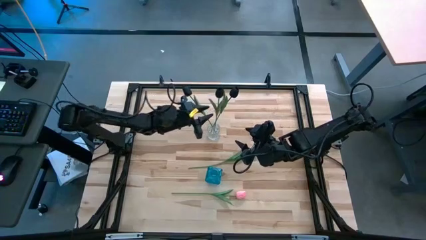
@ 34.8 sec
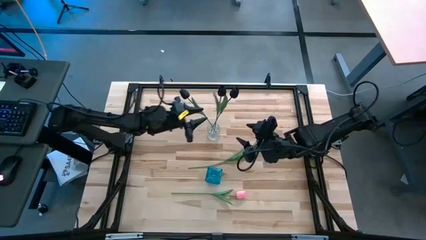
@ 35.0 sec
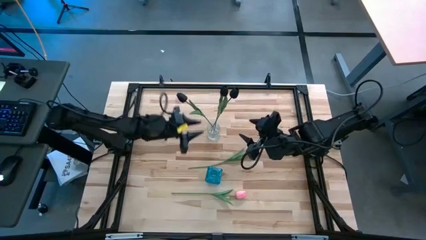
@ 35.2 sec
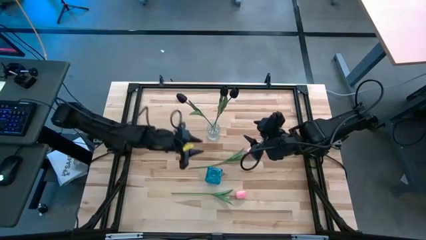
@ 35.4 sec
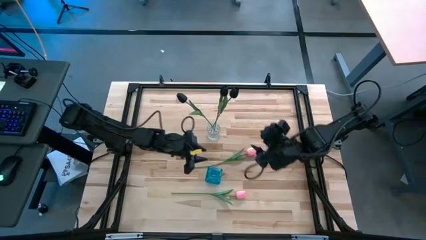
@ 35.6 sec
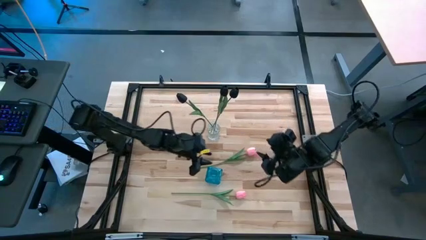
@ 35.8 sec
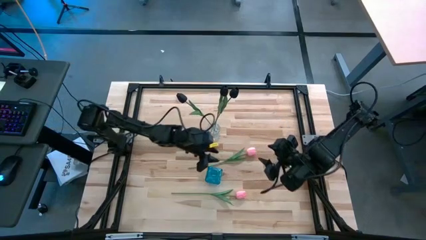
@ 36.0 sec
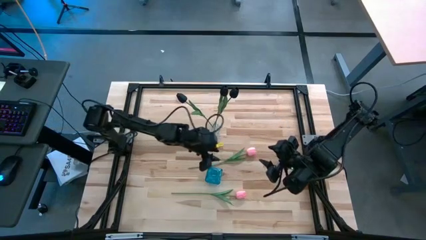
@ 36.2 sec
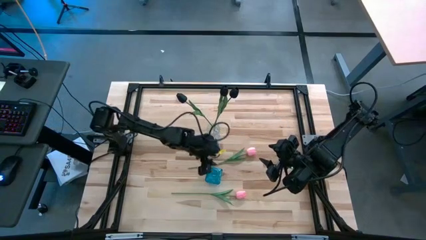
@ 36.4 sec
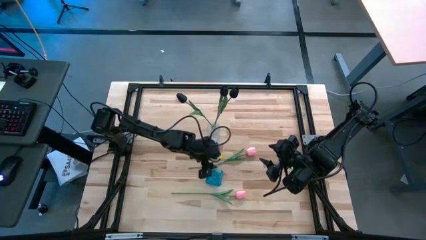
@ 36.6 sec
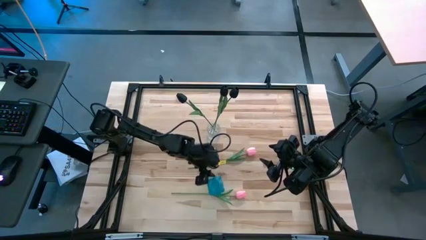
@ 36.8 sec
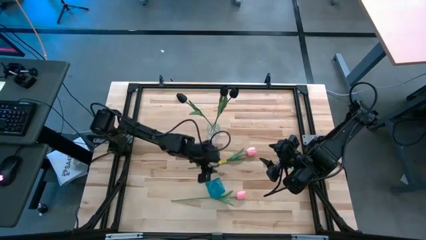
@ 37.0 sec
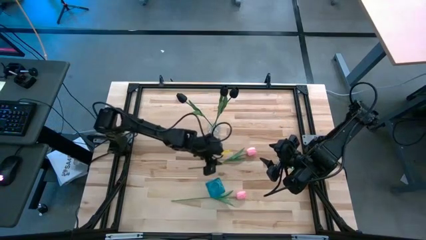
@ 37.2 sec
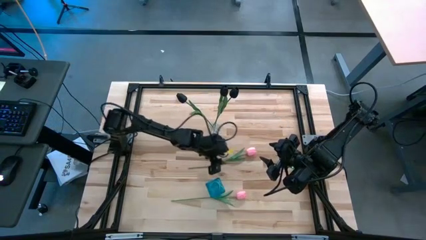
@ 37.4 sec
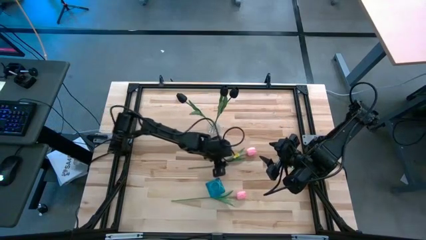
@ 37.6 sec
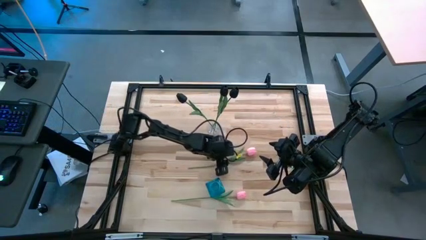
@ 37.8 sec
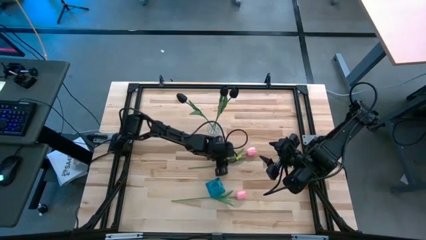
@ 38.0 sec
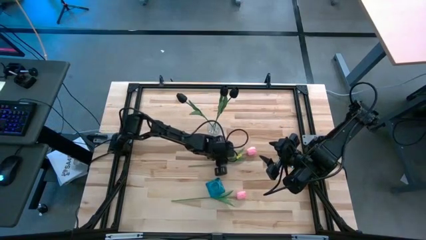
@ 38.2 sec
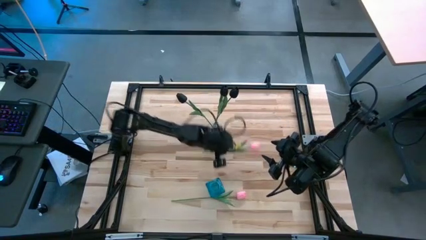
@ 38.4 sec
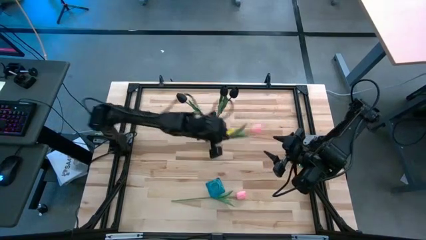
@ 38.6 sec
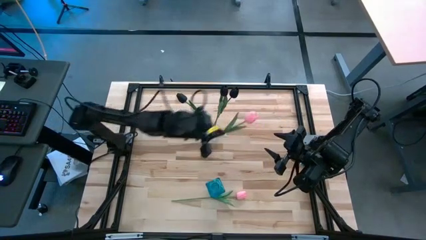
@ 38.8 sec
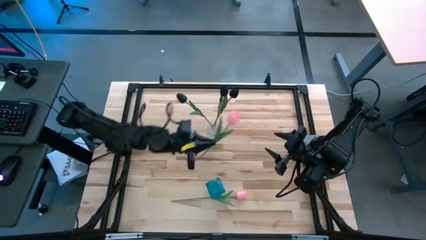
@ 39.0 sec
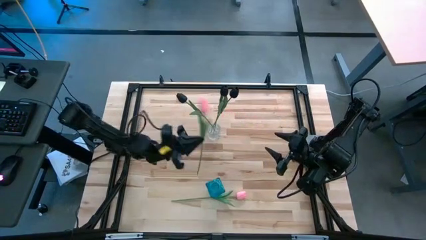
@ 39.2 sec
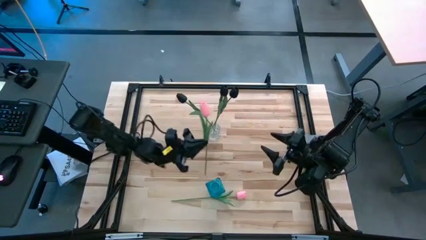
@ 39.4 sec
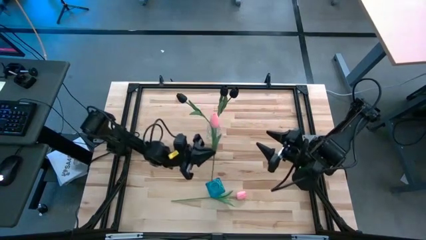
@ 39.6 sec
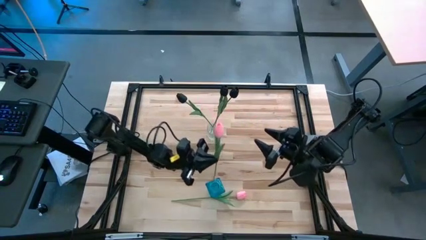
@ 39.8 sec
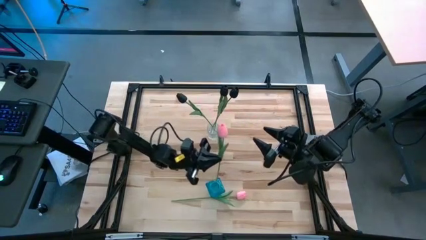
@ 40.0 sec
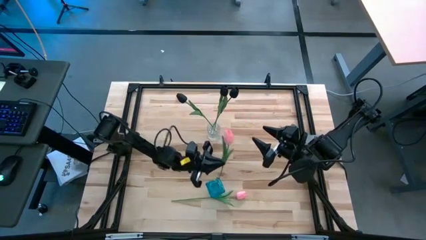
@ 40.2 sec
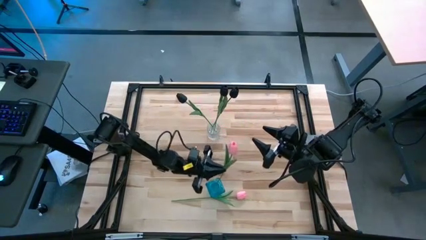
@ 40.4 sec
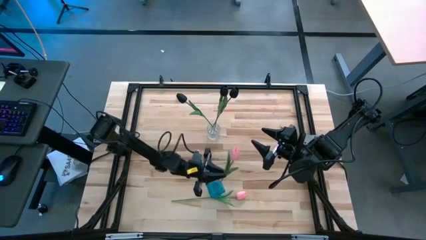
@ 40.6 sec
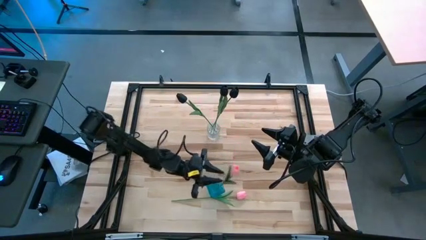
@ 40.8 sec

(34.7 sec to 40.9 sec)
Task: Sort flowers into vase by color
Put the top pink flower into the blue vase

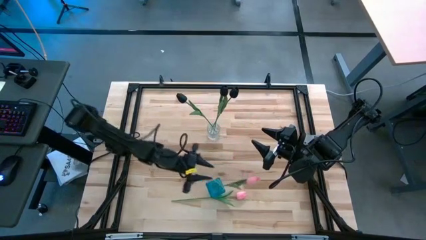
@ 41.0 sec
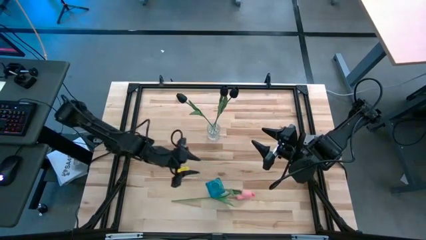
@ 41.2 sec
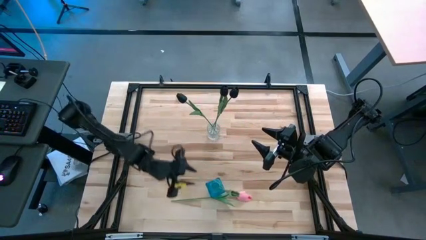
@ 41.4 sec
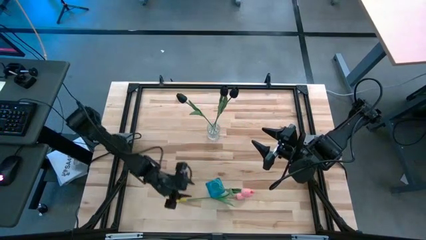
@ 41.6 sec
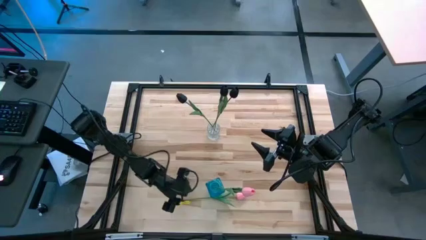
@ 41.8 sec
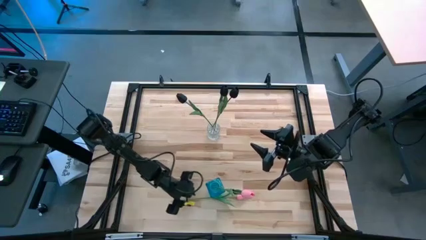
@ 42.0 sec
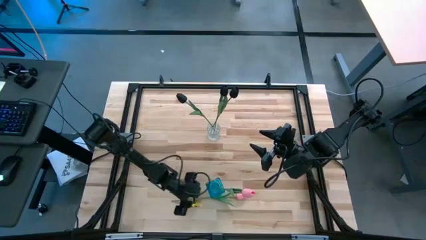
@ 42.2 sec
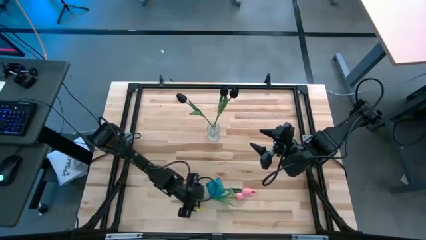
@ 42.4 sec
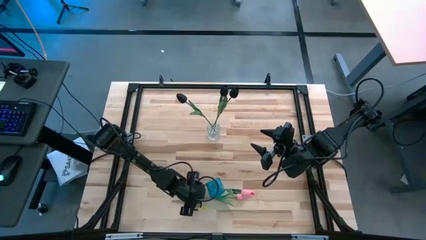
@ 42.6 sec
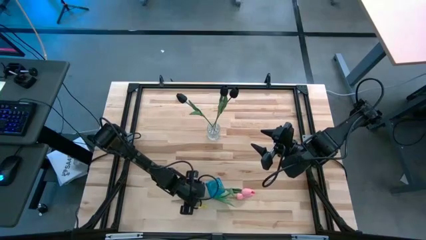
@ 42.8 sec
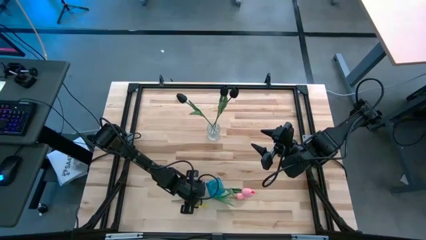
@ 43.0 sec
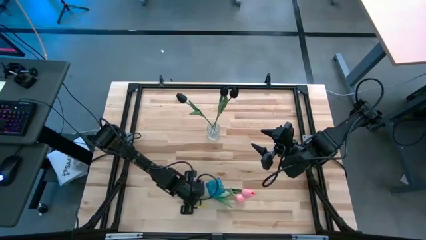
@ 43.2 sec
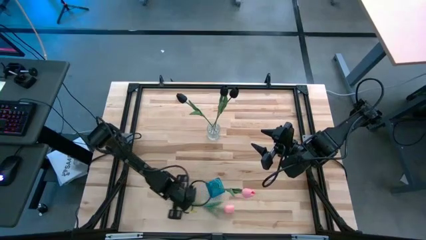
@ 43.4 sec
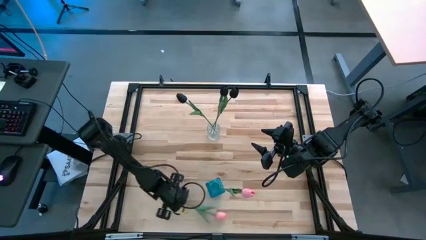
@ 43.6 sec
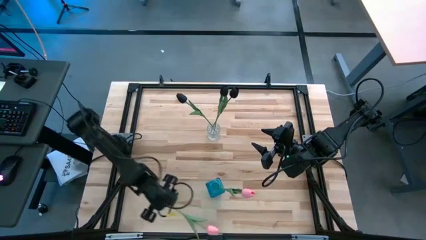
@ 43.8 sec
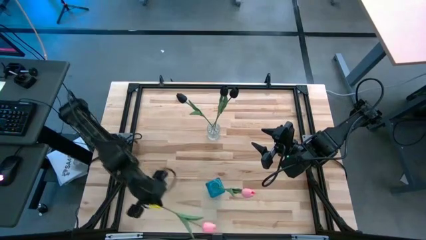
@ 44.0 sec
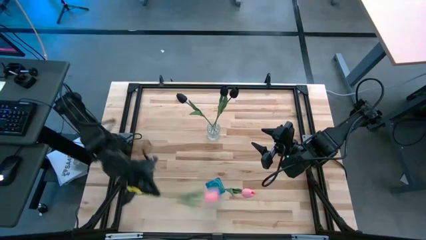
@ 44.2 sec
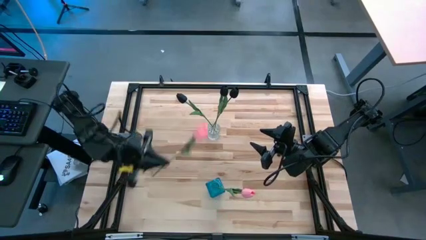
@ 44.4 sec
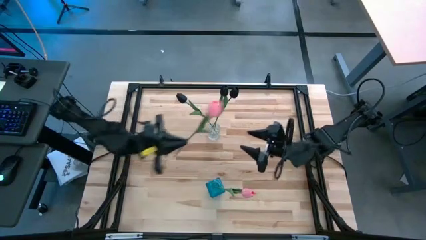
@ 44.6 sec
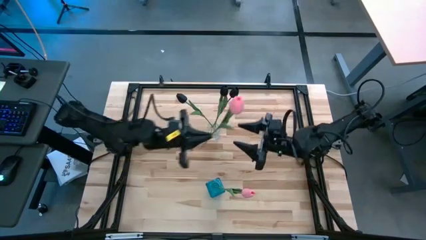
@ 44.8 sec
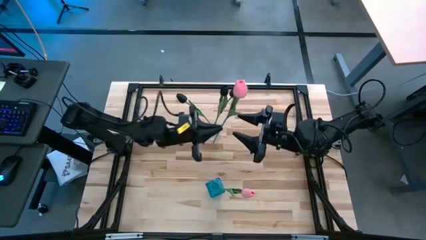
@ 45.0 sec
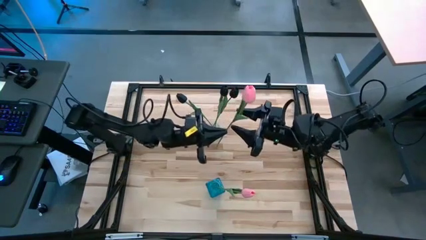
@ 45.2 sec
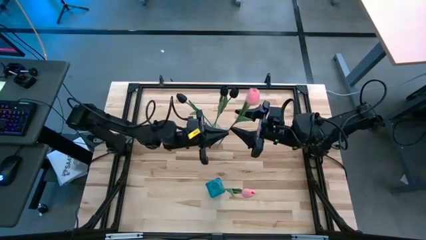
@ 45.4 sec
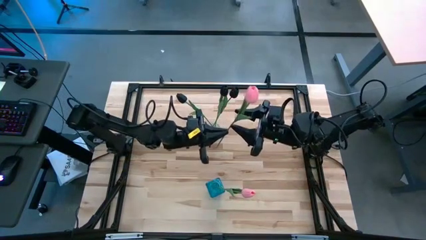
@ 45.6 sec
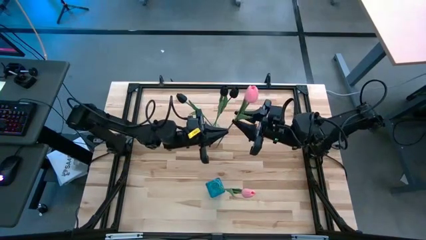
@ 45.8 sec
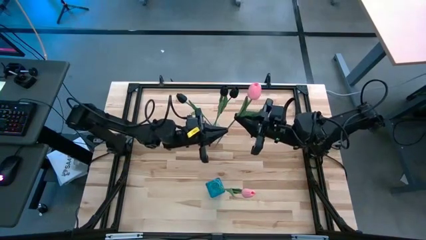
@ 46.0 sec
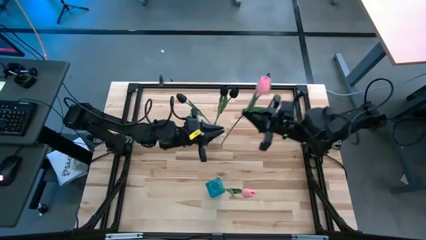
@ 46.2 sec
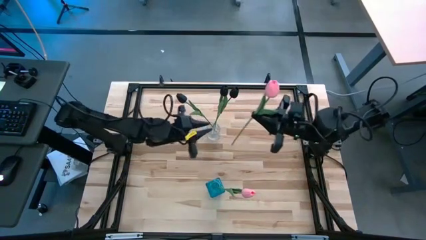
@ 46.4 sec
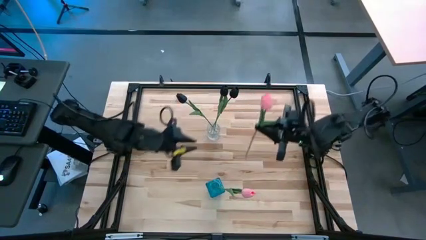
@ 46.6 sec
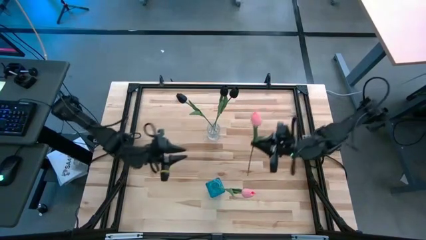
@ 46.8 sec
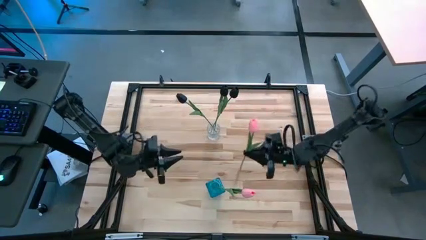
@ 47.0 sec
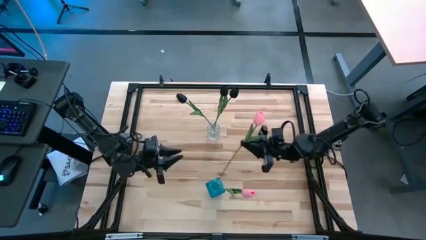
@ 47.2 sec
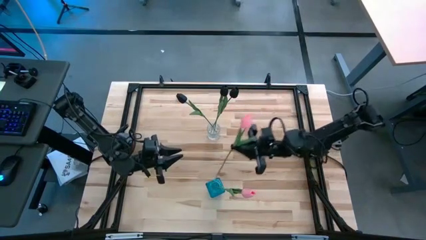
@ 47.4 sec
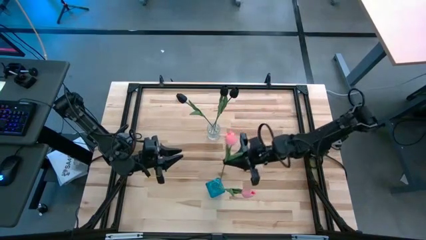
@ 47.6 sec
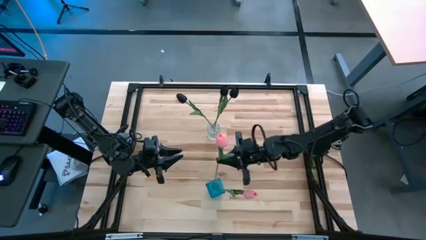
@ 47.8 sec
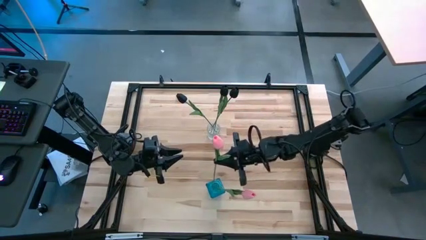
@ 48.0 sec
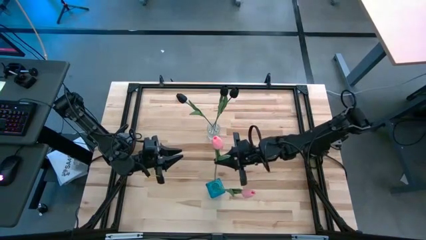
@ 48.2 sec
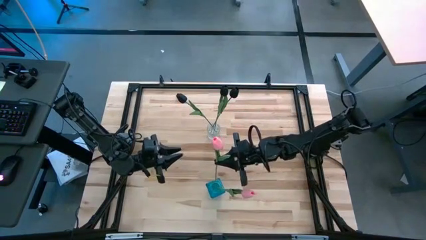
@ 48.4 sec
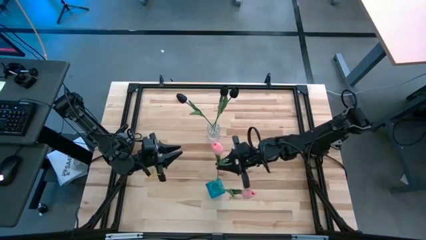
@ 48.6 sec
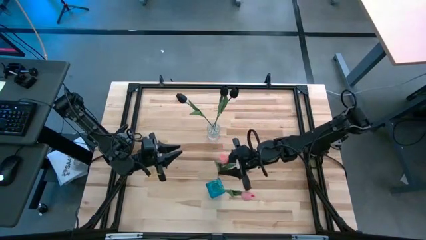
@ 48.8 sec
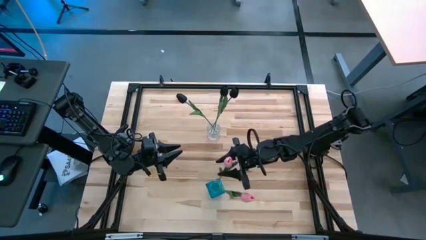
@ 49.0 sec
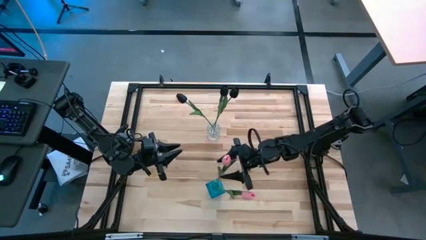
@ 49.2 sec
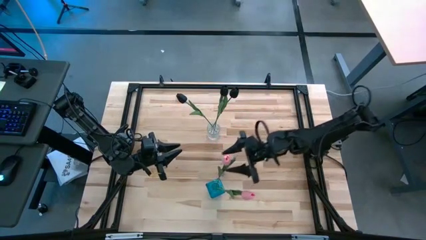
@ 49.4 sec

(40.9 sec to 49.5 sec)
Put the pink flower into the blue vase

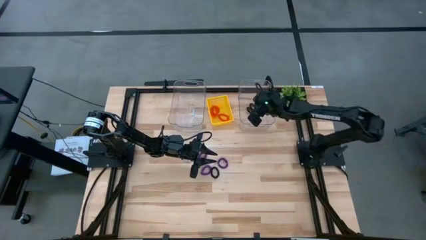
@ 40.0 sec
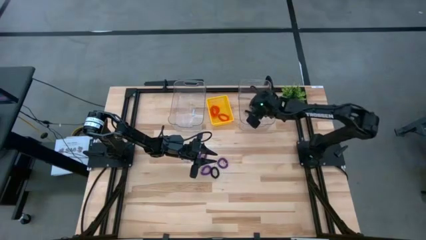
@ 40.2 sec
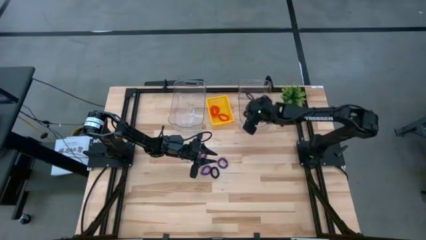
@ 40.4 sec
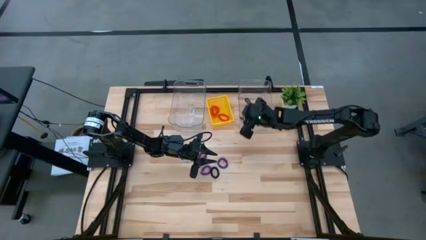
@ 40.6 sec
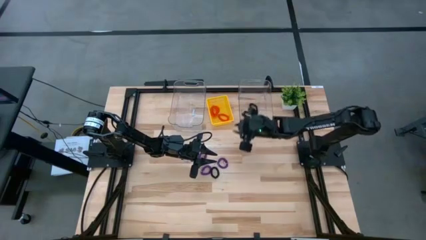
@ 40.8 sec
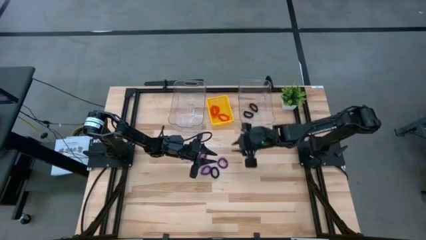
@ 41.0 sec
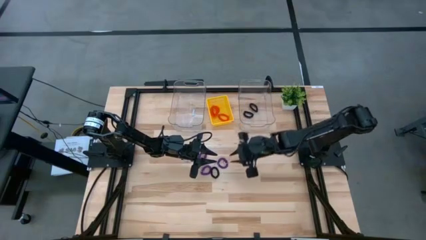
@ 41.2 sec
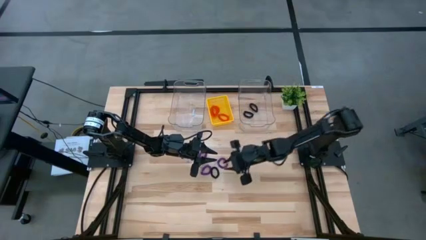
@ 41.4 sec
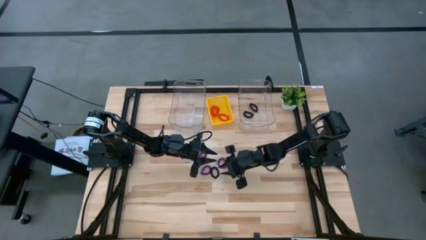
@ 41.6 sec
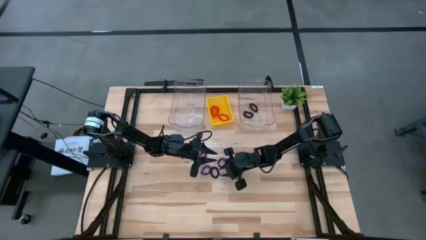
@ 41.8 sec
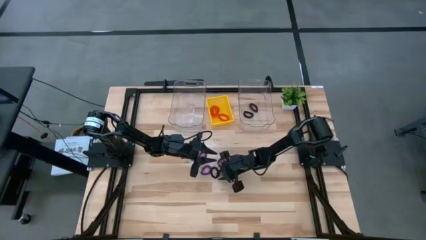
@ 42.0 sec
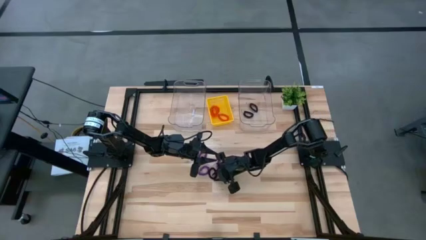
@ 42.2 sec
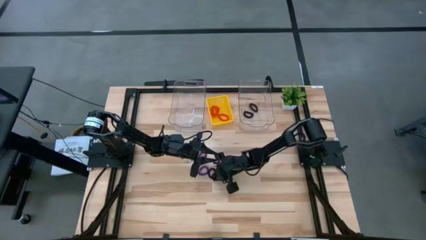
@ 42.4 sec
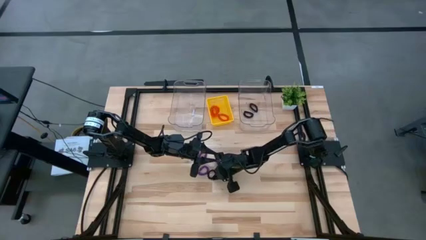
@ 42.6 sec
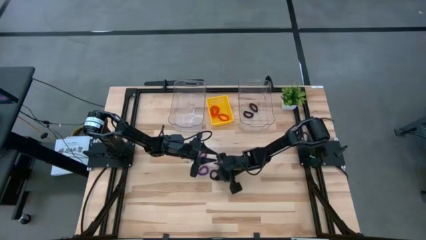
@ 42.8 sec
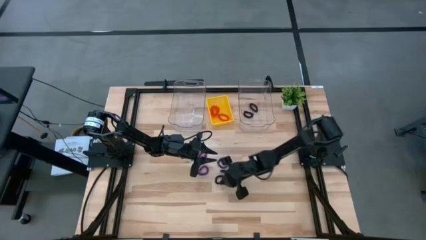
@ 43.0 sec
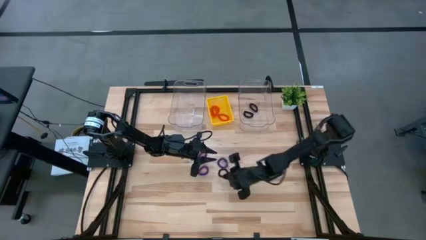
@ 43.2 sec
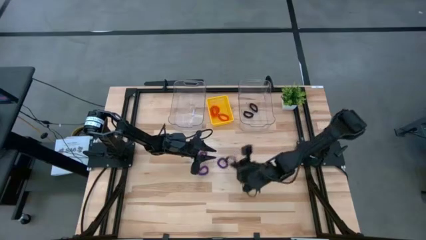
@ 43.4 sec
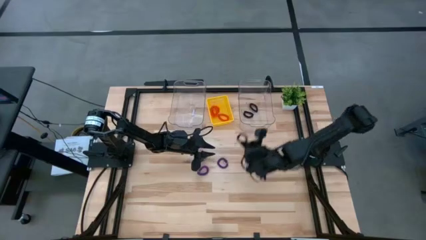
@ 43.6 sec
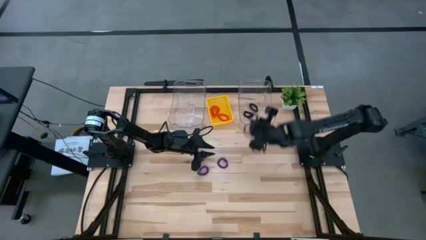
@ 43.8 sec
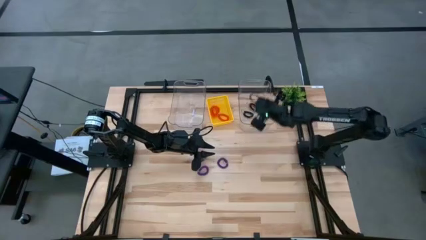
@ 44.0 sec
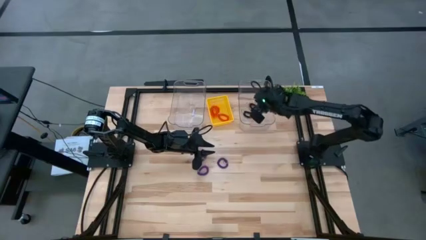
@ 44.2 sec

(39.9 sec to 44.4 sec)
Task: Sort spring keychains
Put the black spring keychain into the right transparent bin
